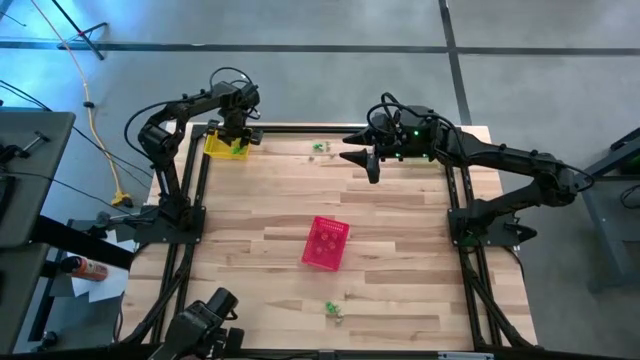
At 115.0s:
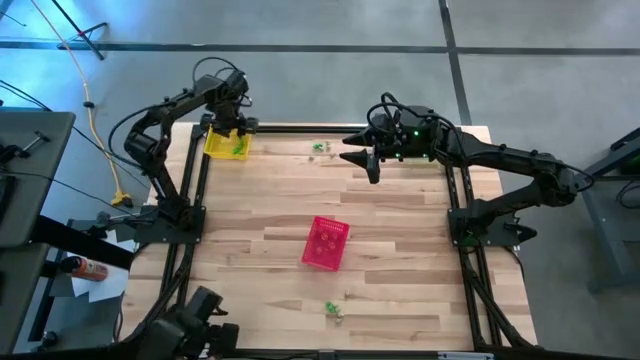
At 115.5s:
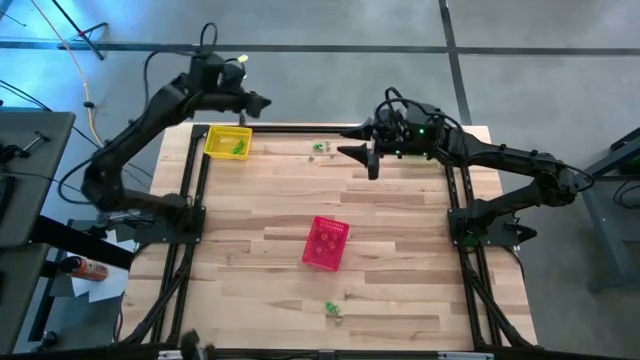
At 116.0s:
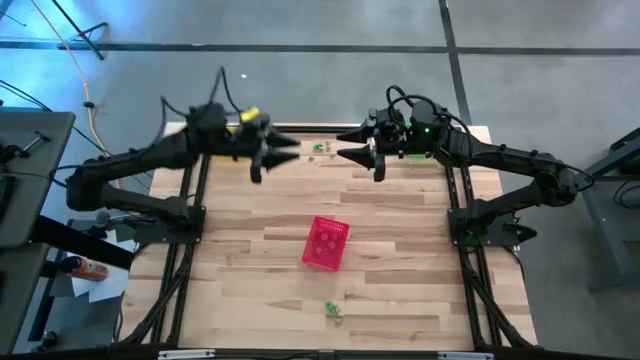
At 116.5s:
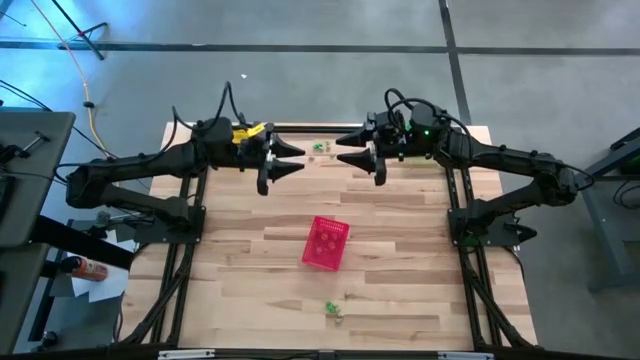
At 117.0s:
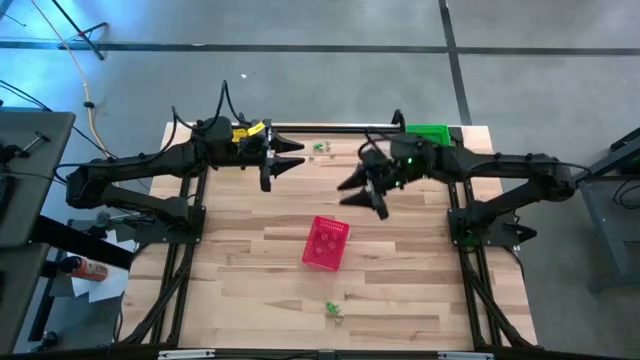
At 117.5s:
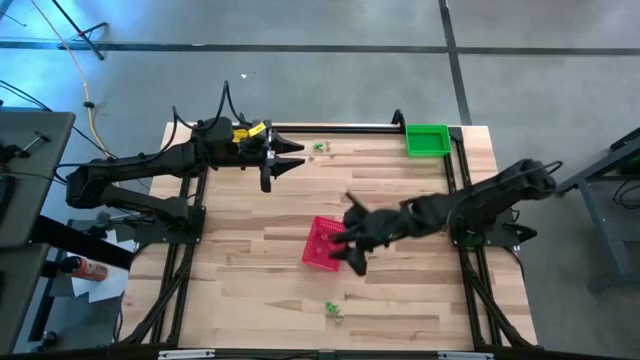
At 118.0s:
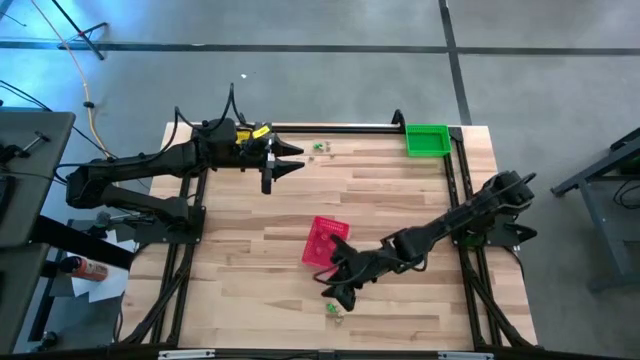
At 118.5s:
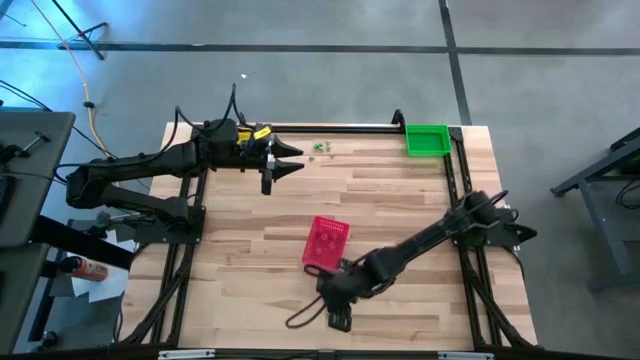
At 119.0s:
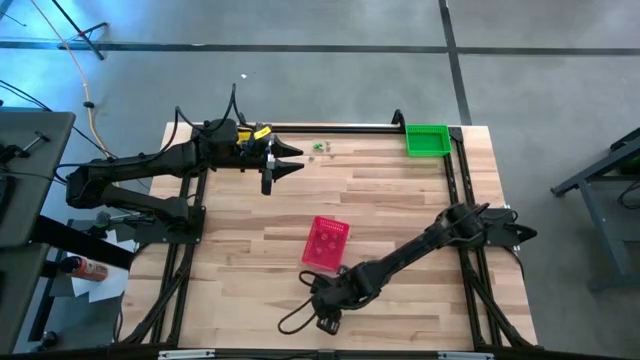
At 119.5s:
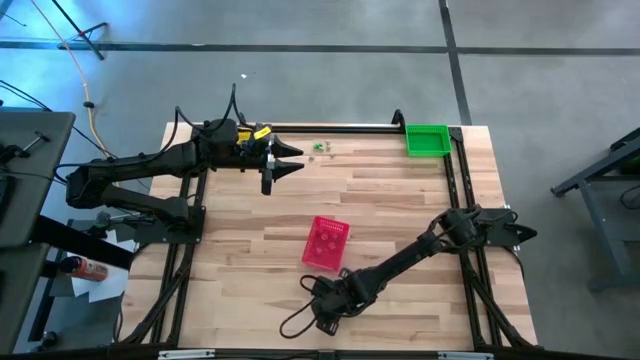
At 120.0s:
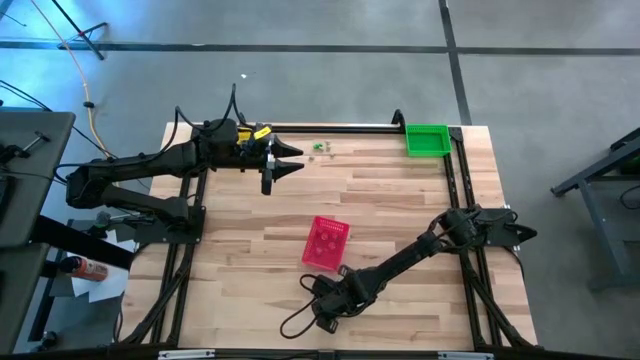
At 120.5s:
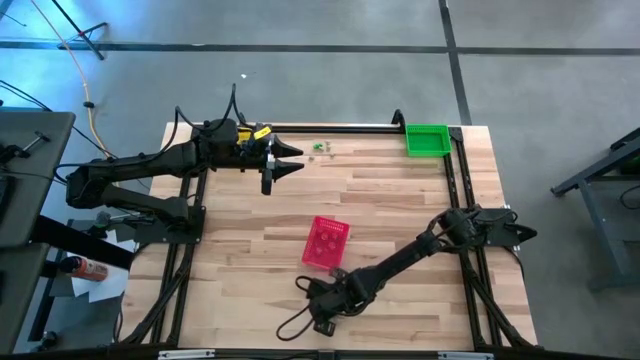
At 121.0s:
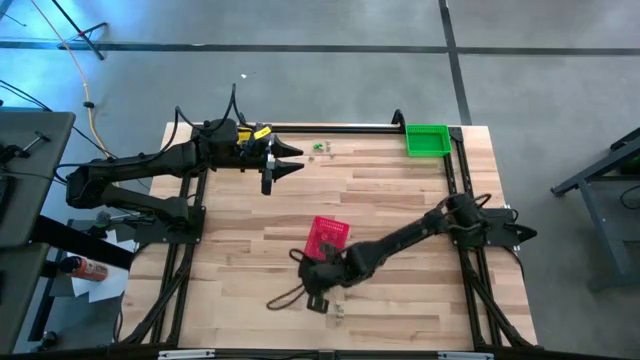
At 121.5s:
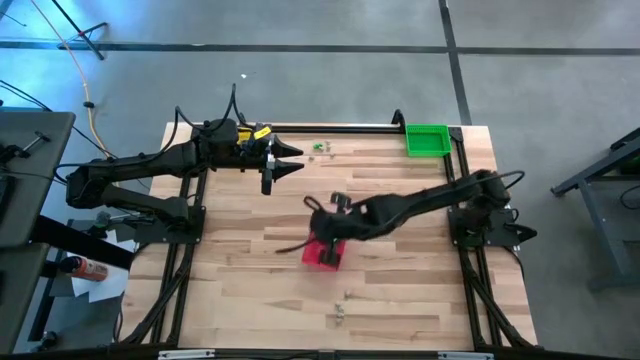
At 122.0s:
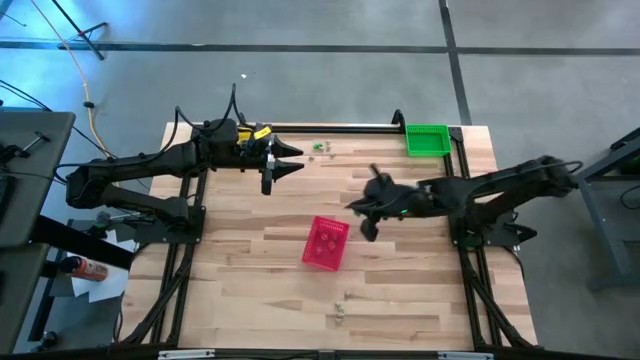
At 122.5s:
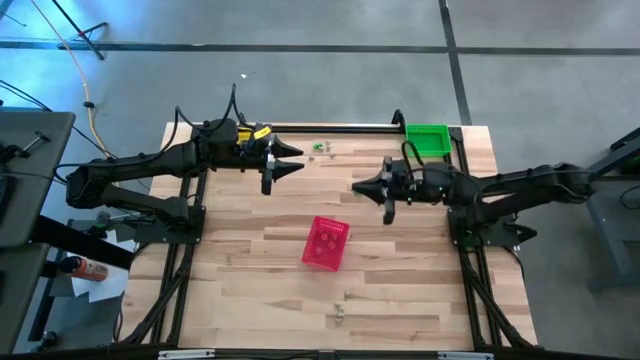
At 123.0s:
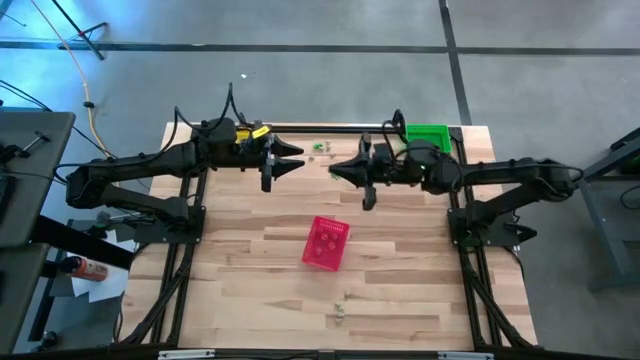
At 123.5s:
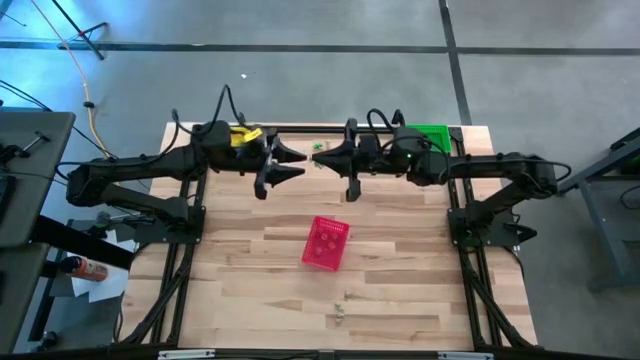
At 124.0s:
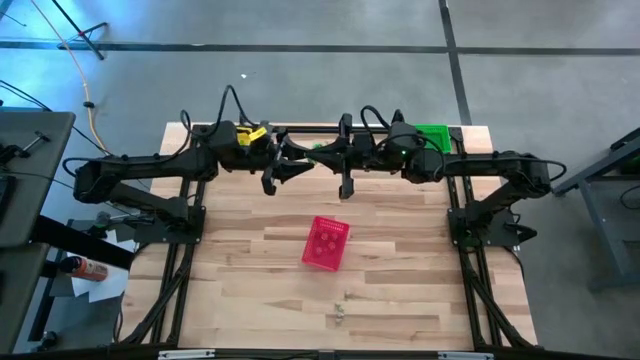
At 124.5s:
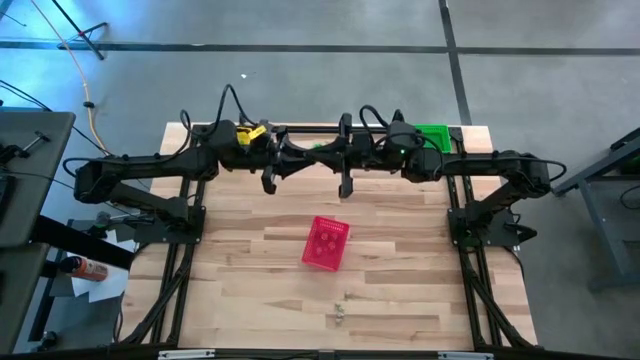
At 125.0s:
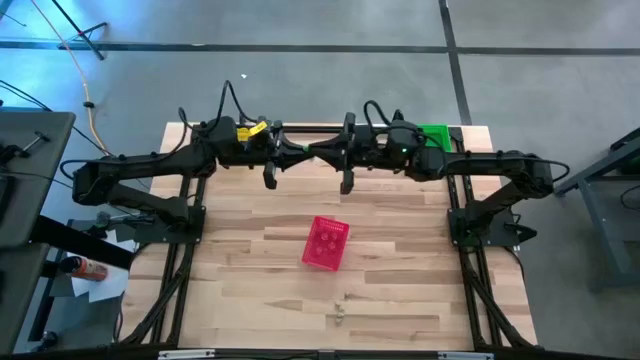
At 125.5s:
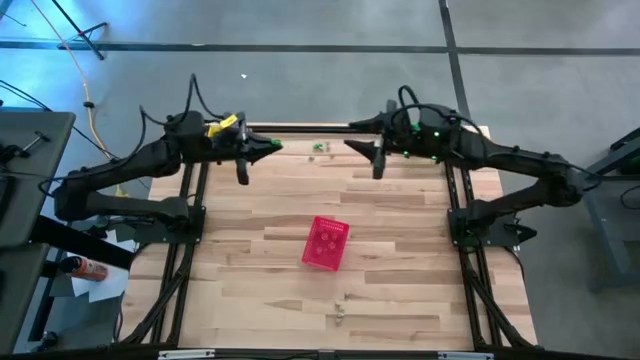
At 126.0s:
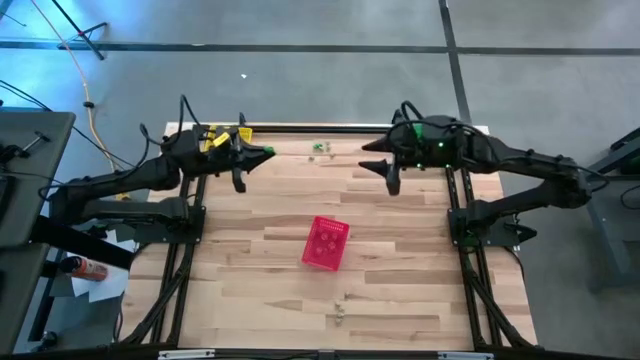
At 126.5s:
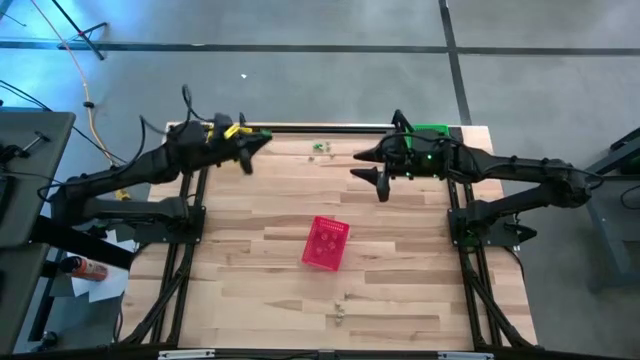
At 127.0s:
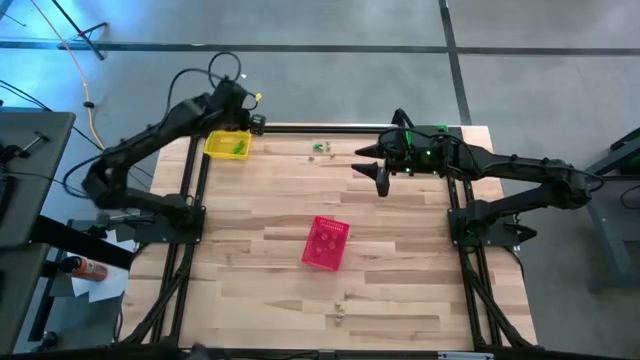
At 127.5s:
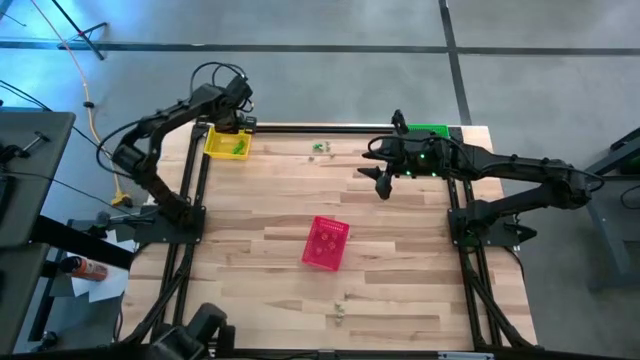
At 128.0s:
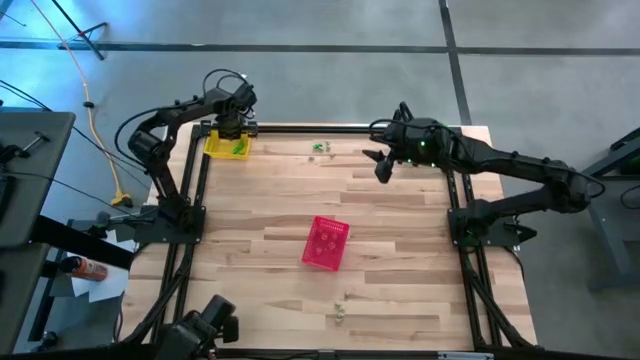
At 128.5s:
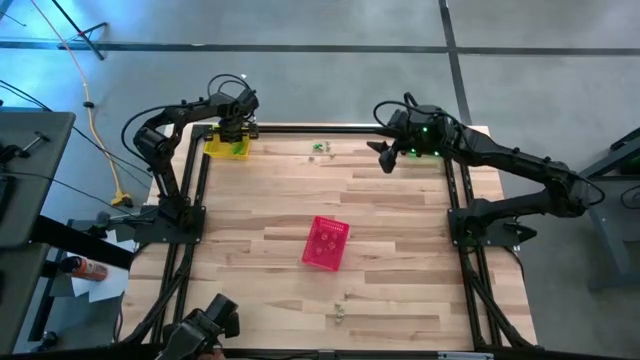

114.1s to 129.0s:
Task: Sort Halloween decoration
Put the green skeleton toy into the yellow bin

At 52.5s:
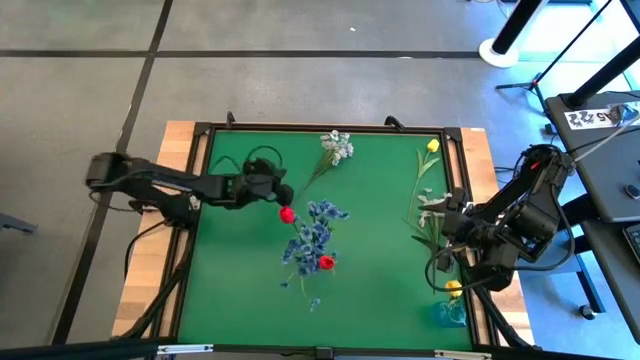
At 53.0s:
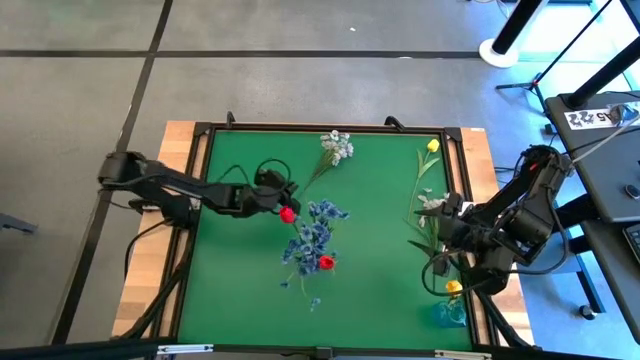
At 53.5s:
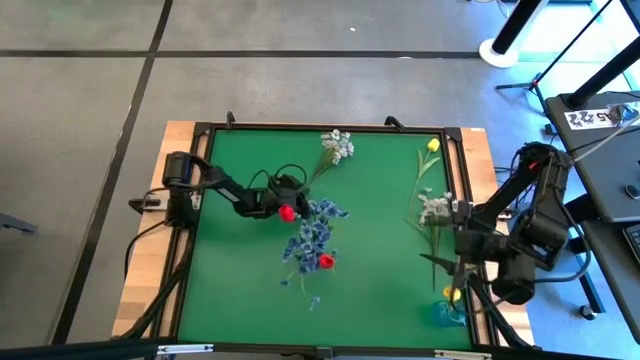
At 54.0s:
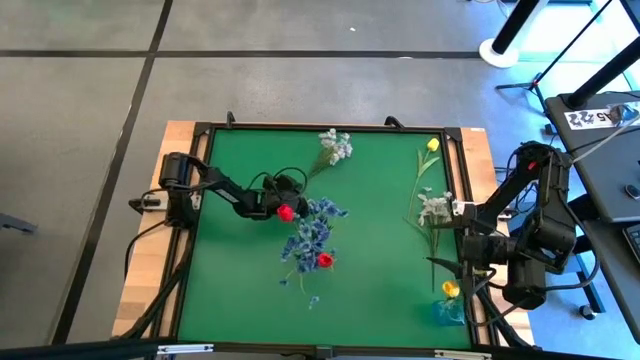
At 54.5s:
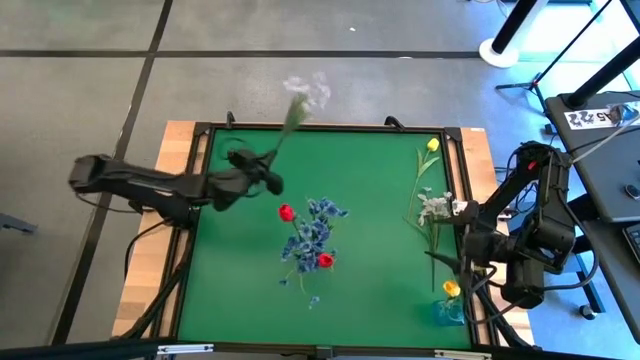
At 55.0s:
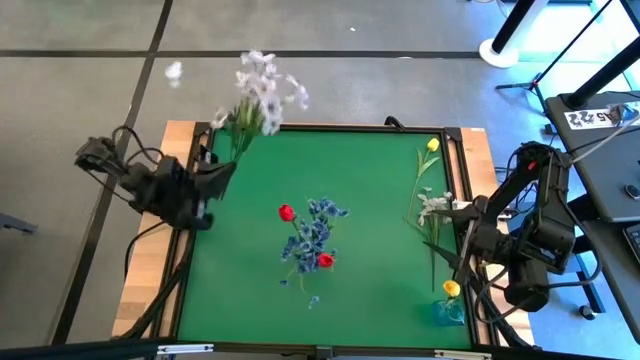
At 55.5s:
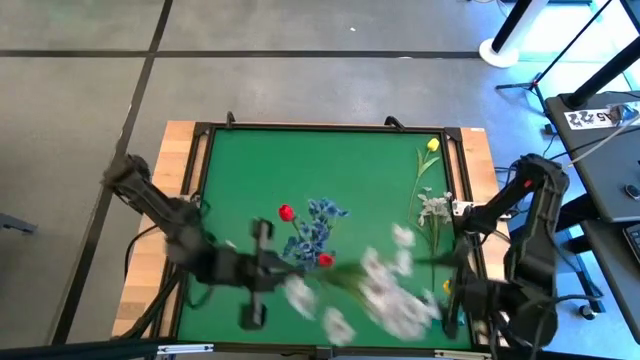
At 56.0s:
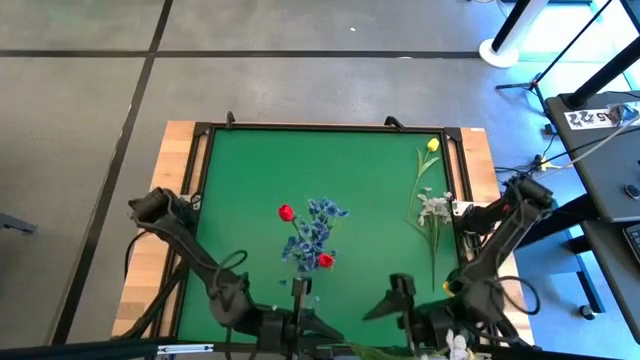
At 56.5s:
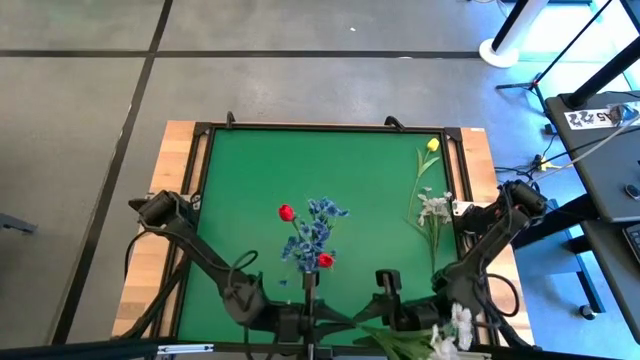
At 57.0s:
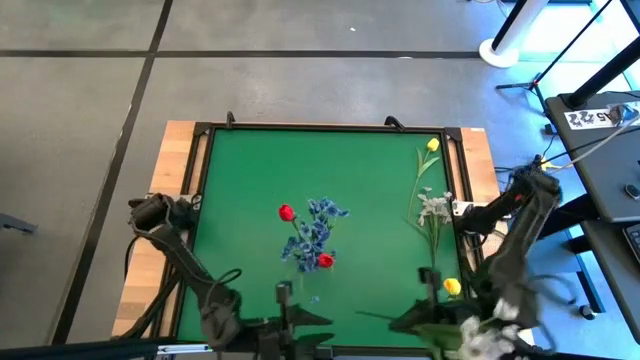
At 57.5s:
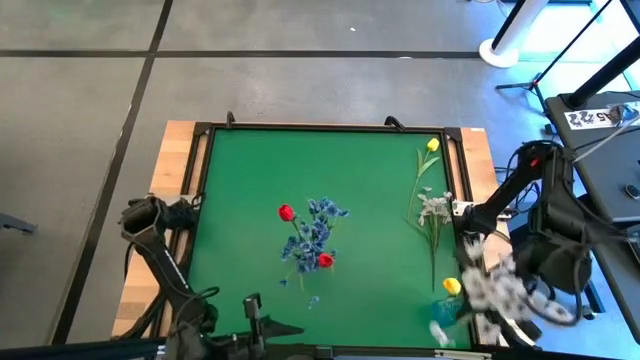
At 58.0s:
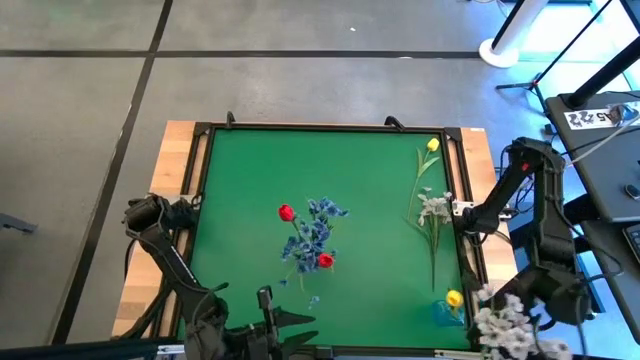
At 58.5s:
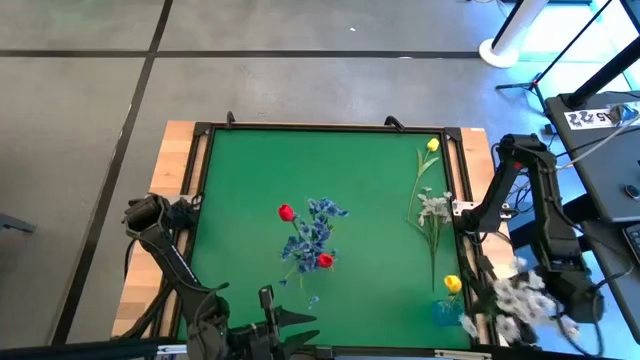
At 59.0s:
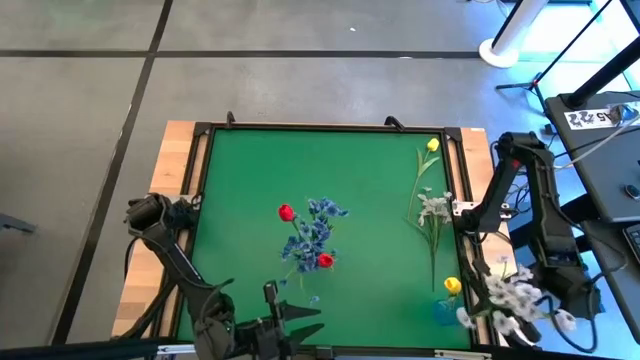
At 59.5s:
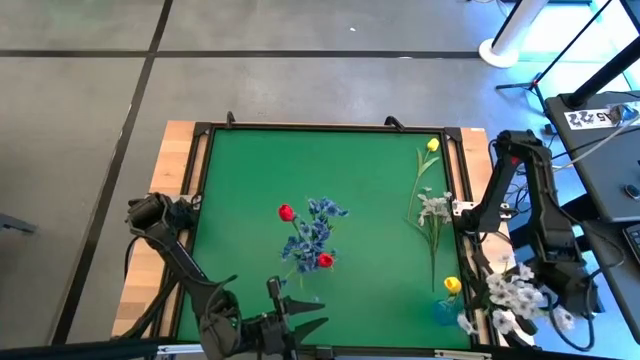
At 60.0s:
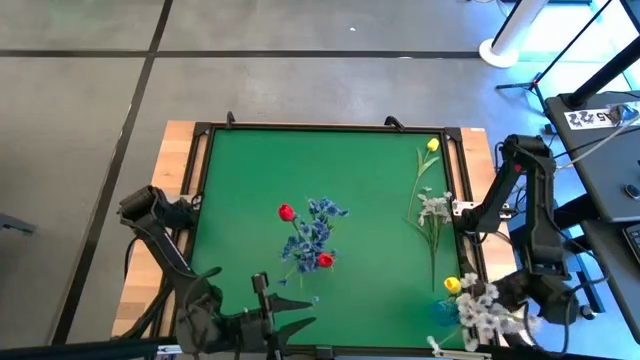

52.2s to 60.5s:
Task: Sort flowers into vase by color
Put the top white flowers into the blue vase
